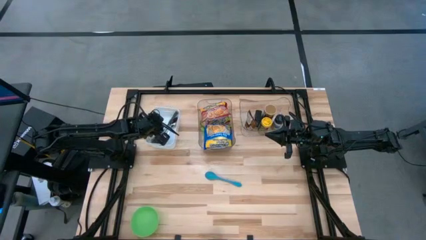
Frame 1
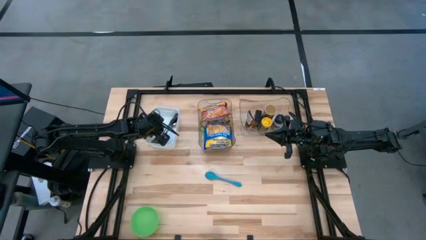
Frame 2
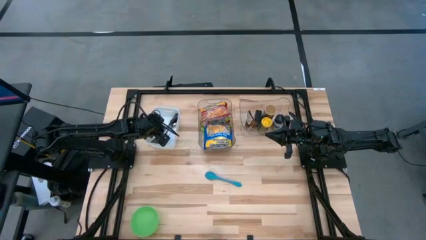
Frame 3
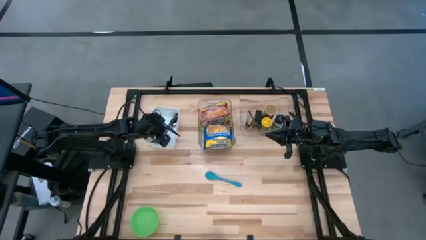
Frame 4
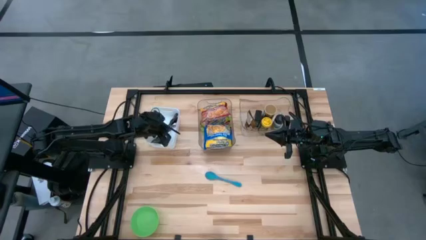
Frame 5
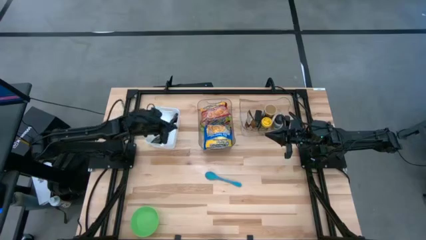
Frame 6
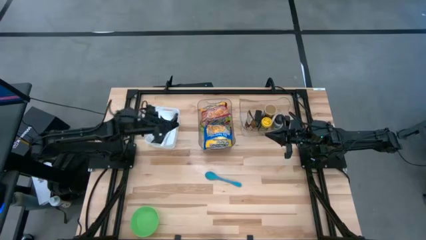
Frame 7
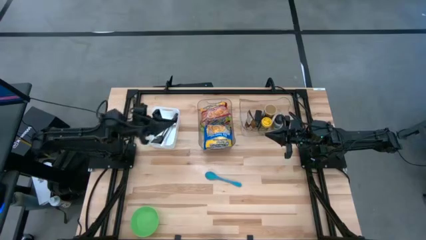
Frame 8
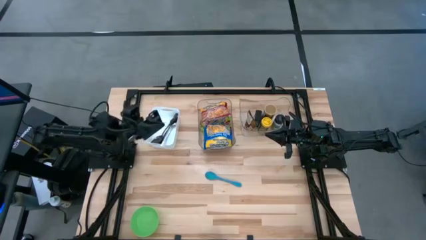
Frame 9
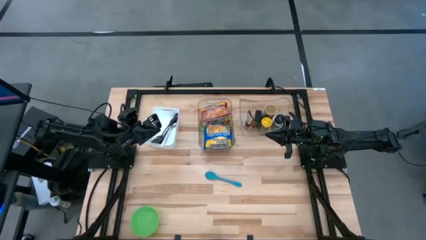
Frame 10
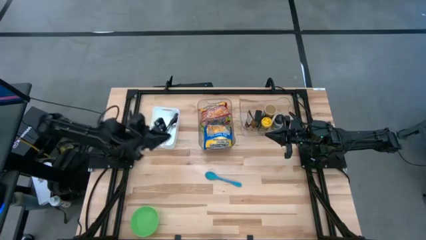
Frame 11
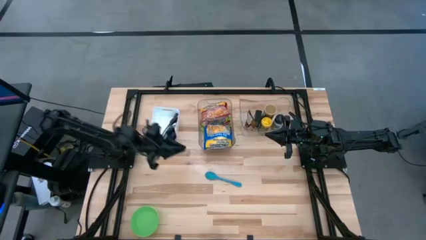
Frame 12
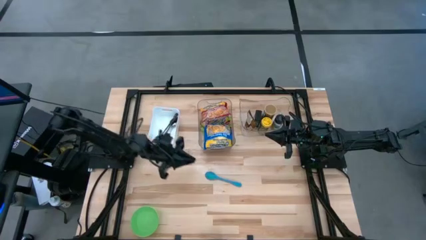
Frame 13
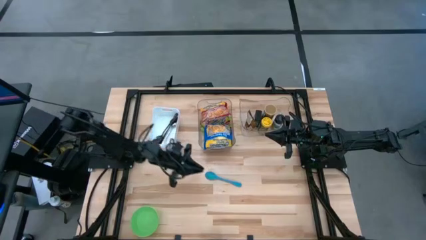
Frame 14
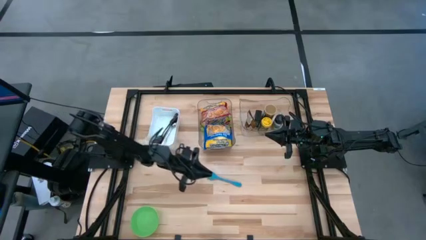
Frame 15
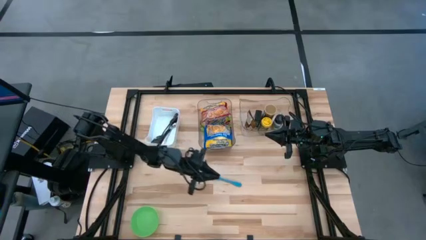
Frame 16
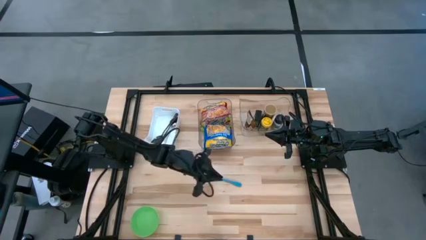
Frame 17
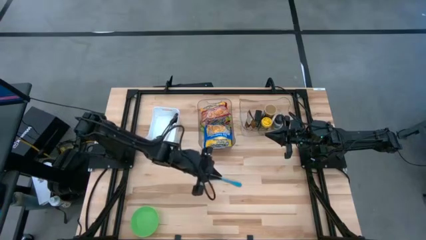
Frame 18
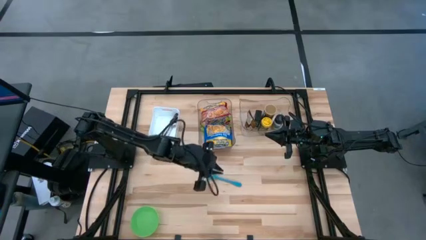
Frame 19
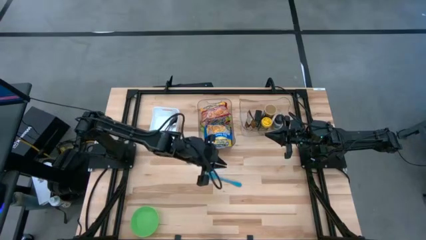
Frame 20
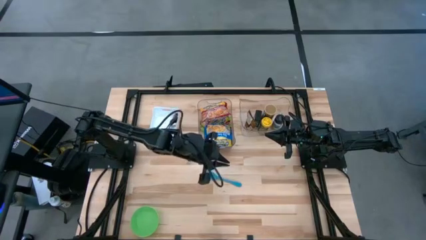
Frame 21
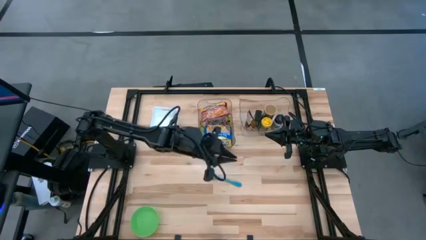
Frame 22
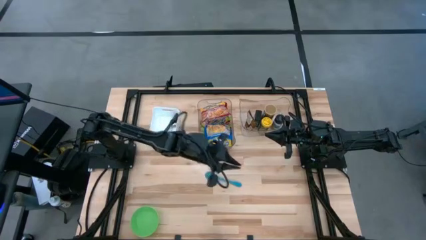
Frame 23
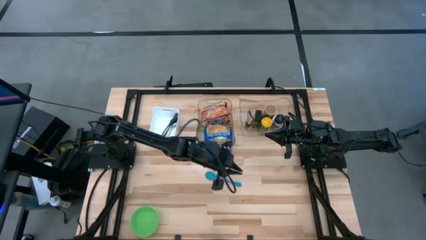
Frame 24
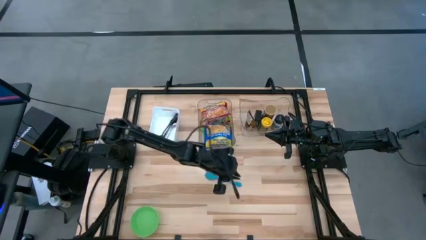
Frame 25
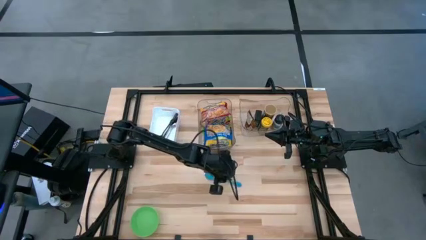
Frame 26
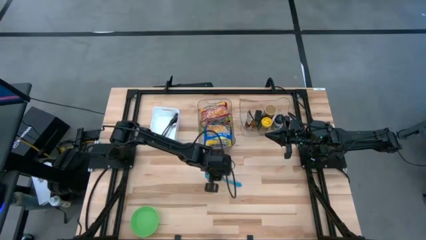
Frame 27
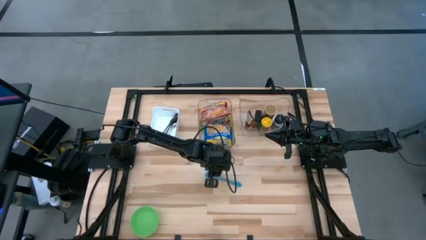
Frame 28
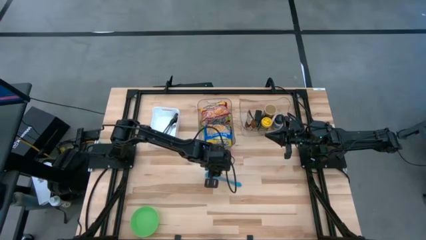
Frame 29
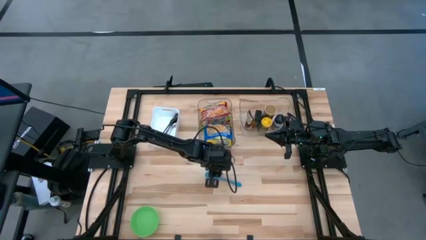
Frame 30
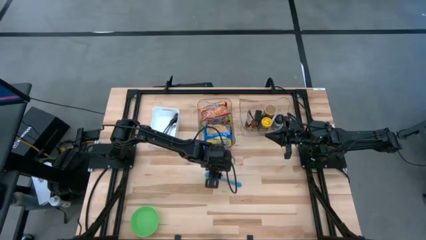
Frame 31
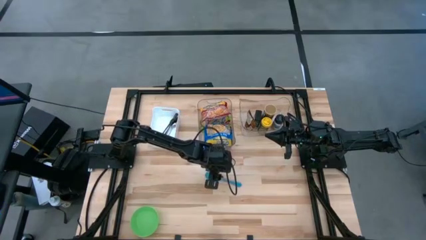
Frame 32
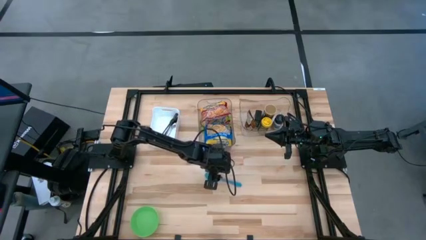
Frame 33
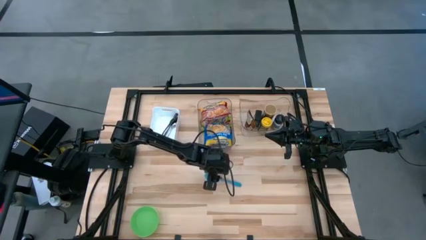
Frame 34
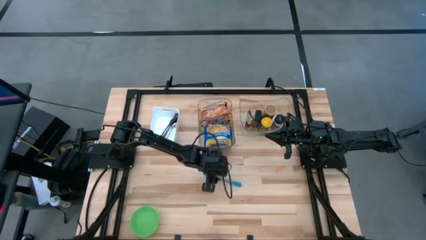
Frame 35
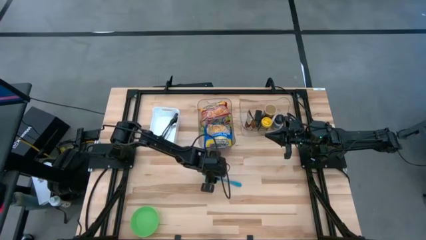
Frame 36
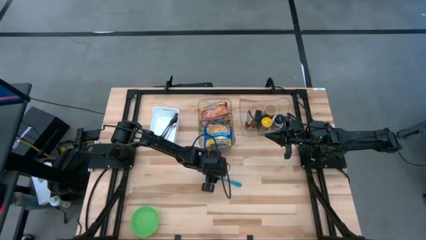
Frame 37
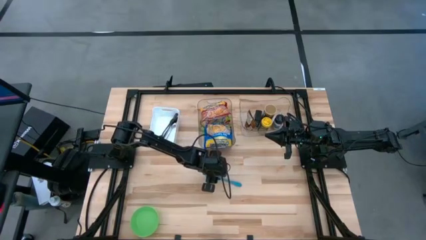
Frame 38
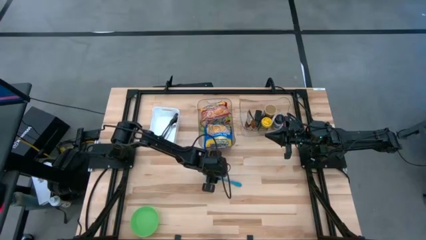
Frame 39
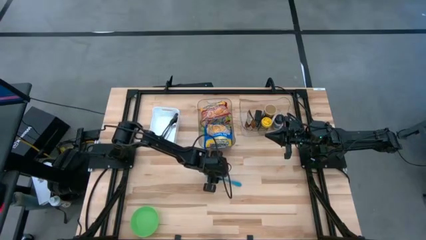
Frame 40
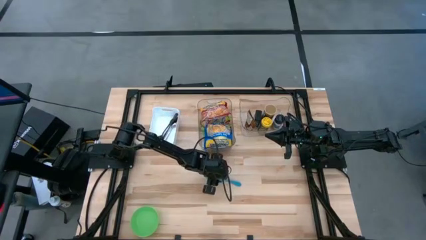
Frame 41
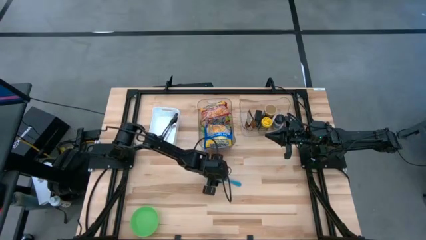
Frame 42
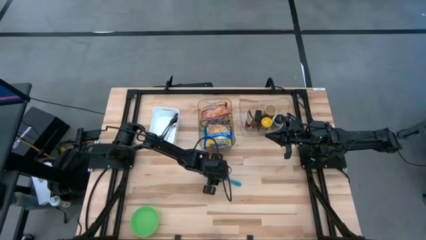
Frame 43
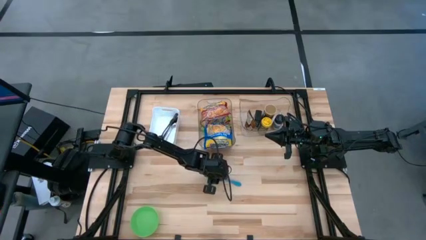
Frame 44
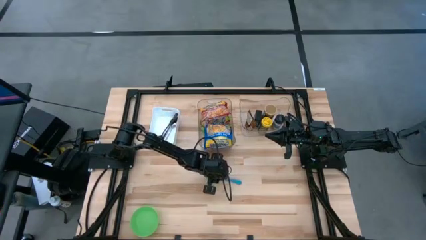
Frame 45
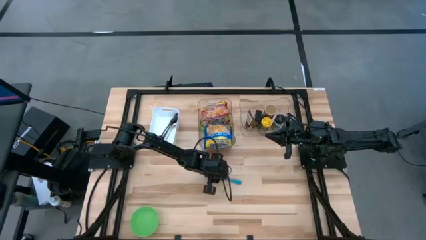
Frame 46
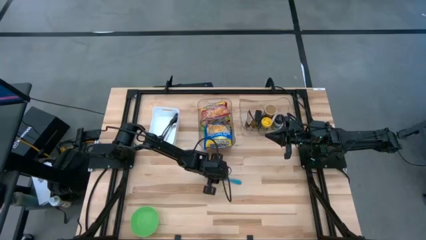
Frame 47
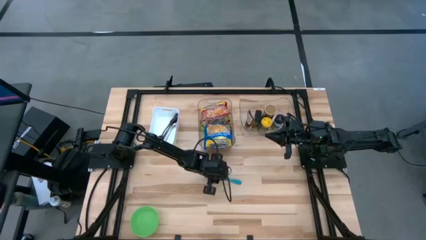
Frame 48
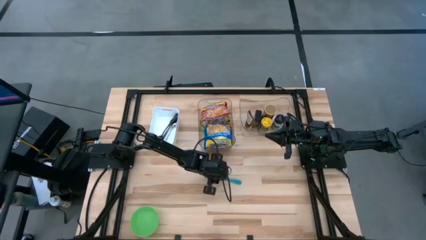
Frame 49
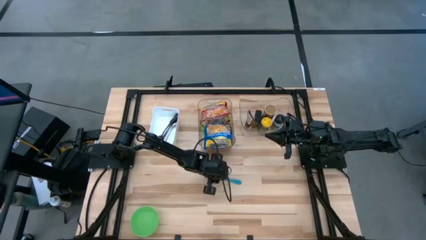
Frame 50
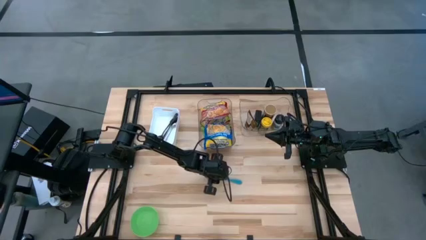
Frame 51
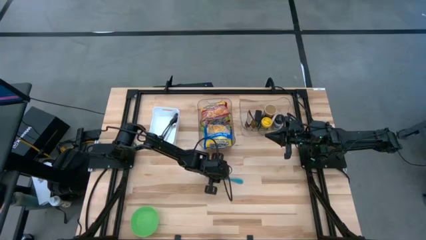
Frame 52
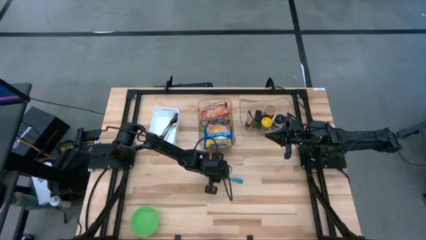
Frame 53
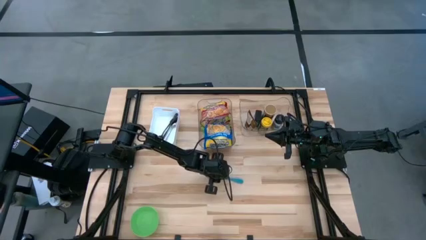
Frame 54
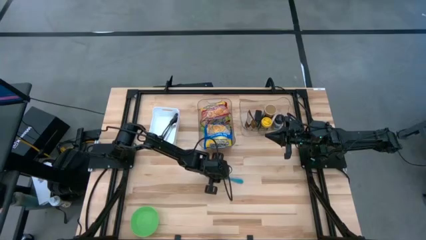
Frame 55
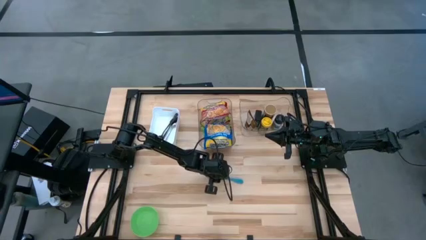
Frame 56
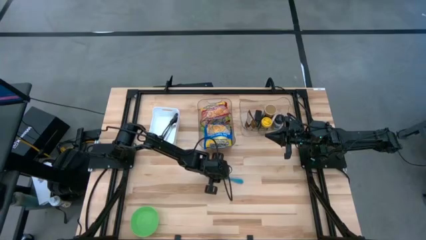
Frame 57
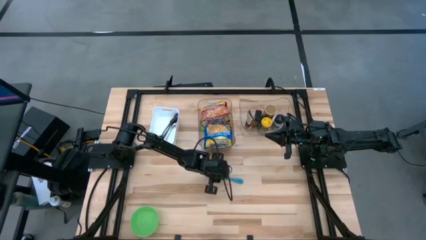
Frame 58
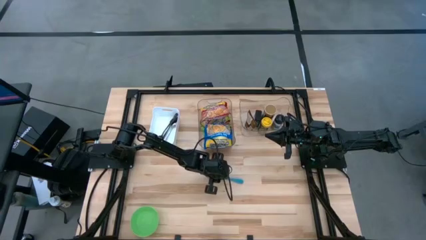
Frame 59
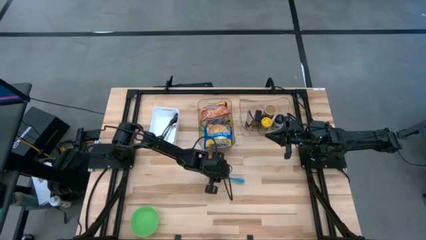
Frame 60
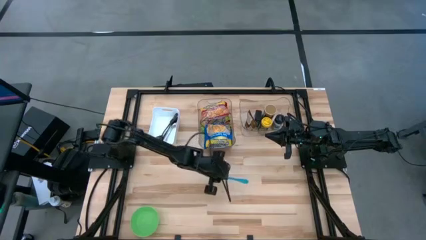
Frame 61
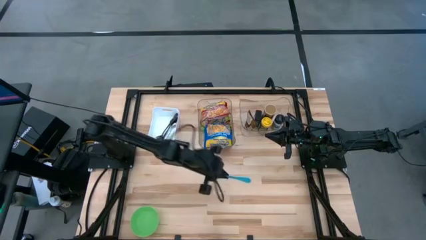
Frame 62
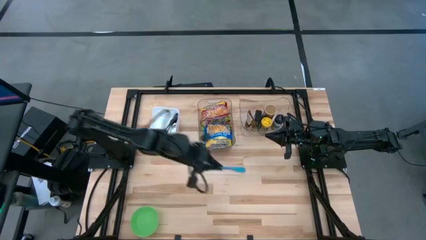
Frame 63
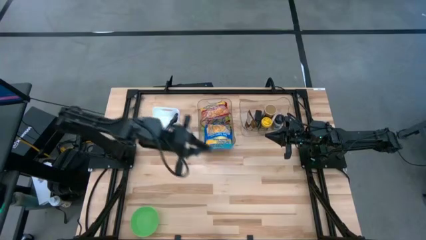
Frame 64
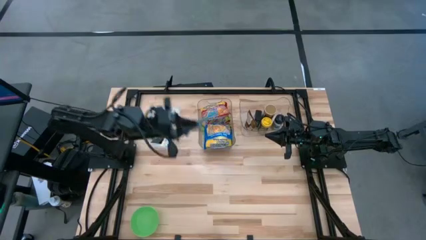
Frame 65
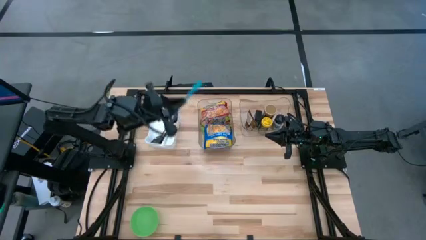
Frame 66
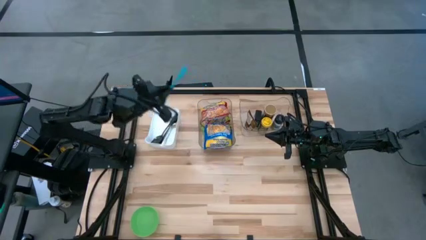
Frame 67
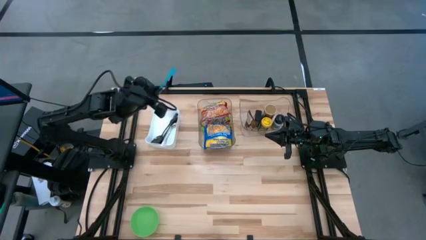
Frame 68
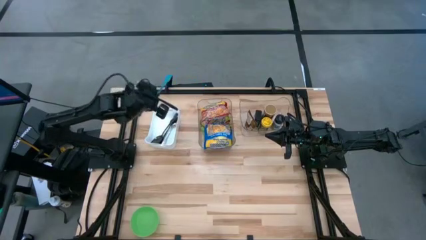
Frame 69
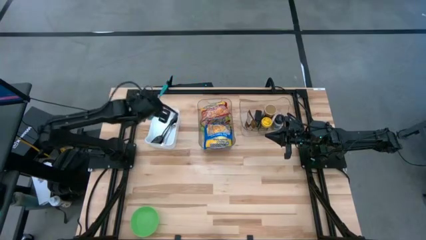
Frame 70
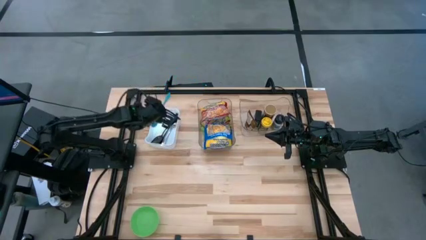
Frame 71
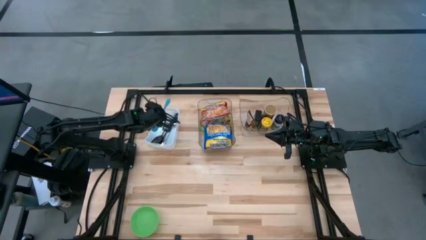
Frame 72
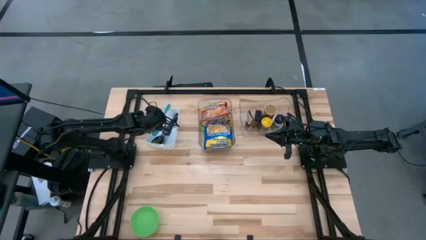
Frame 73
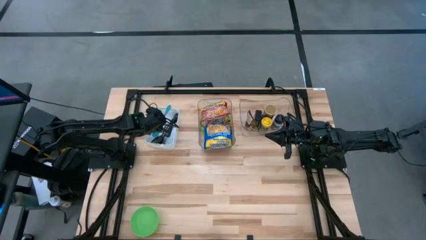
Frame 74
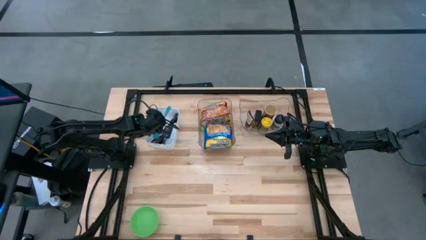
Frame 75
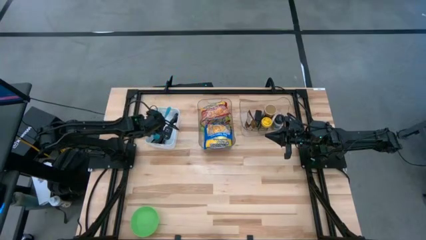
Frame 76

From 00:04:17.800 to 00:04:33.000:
Task: Pick & Place Food Item
Put the blue spoon into the white bin
